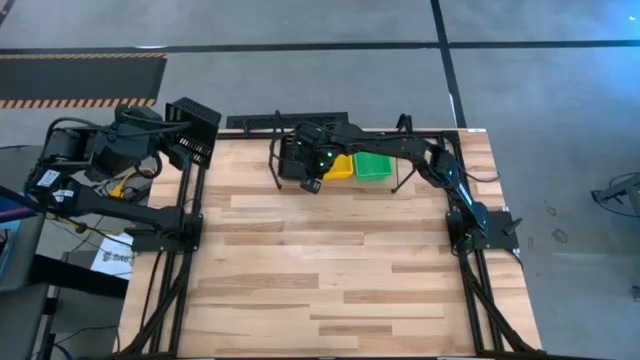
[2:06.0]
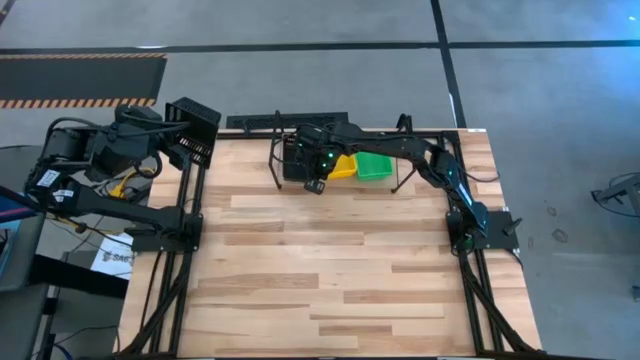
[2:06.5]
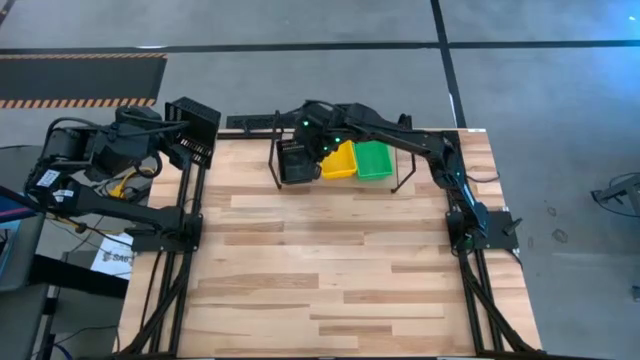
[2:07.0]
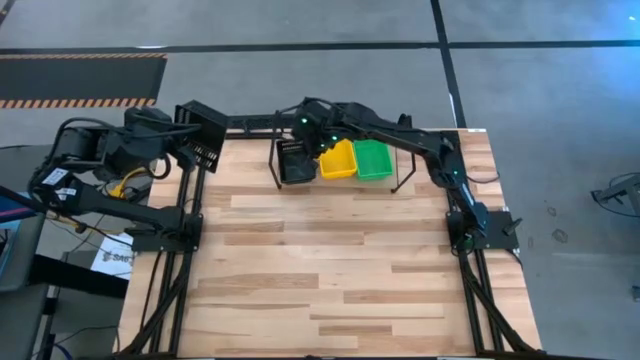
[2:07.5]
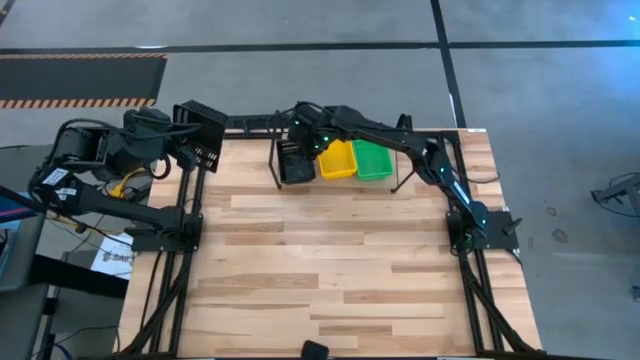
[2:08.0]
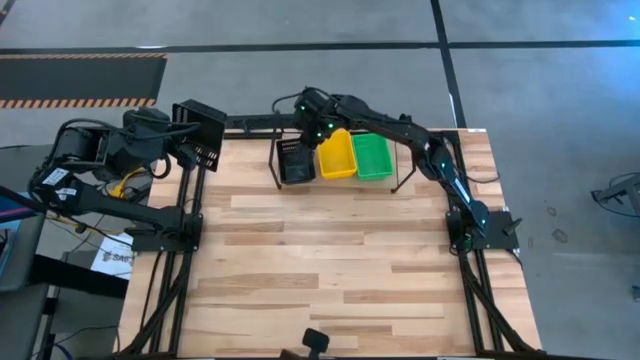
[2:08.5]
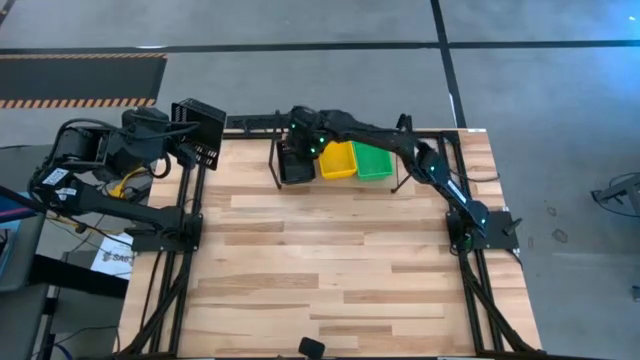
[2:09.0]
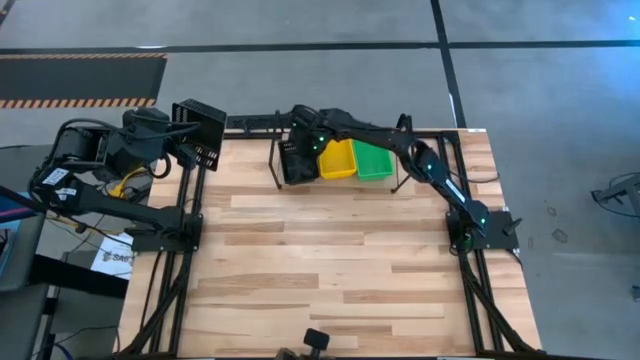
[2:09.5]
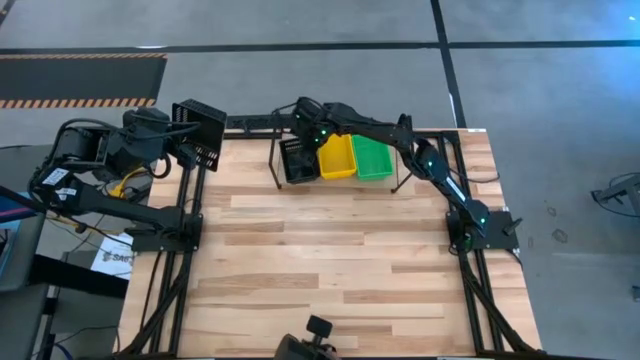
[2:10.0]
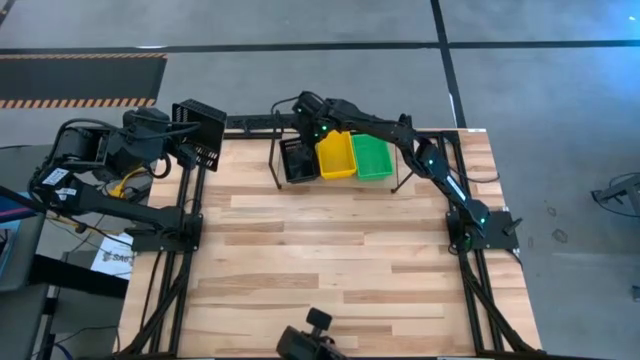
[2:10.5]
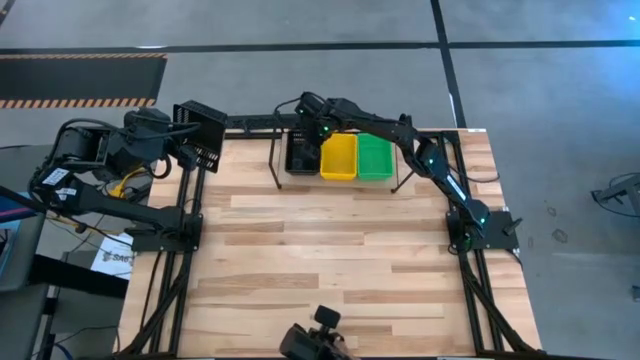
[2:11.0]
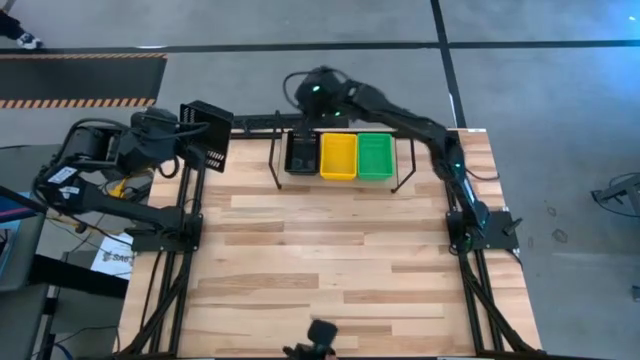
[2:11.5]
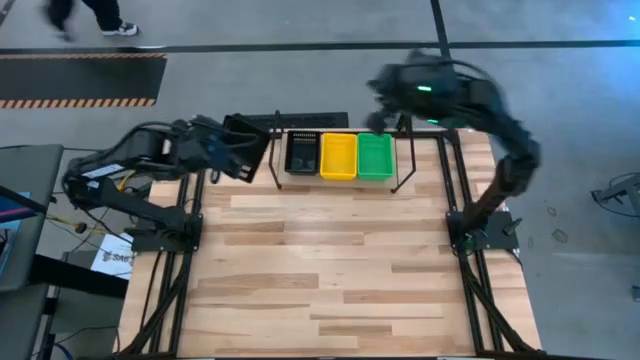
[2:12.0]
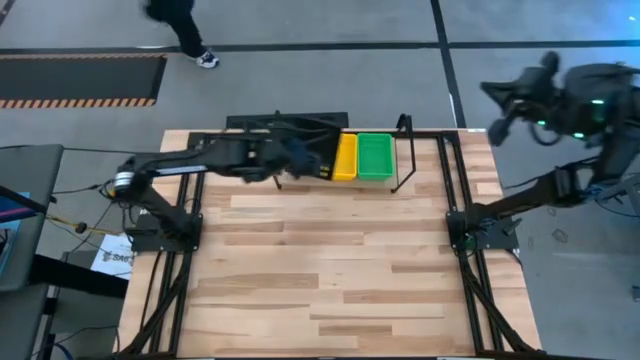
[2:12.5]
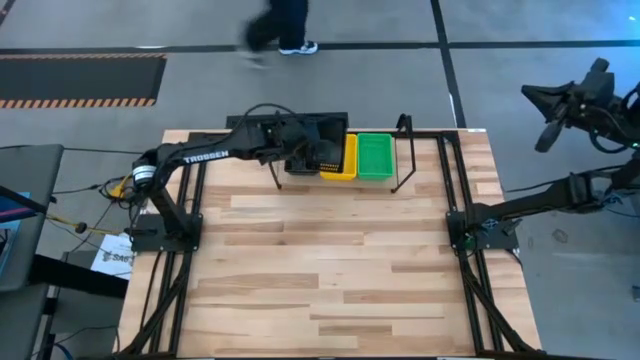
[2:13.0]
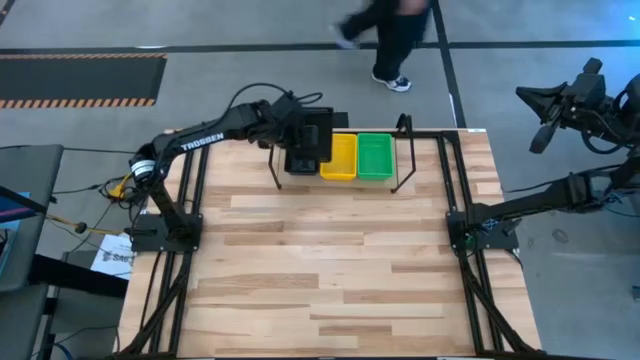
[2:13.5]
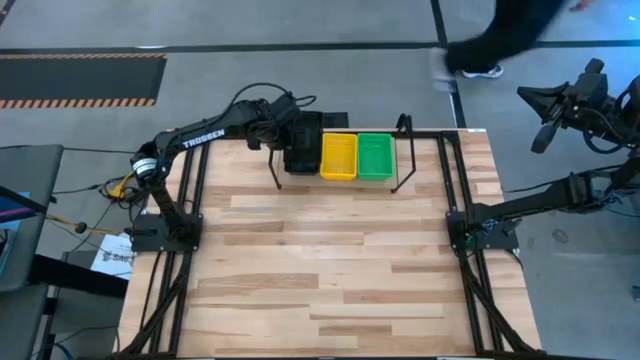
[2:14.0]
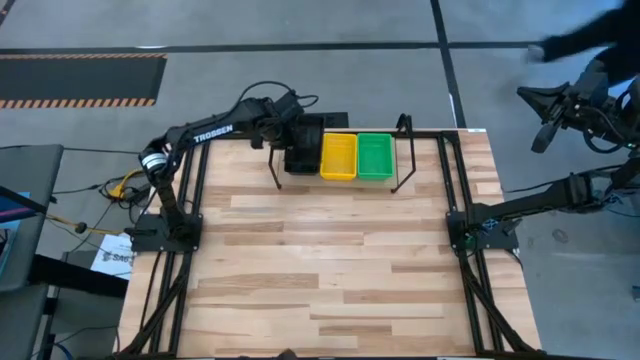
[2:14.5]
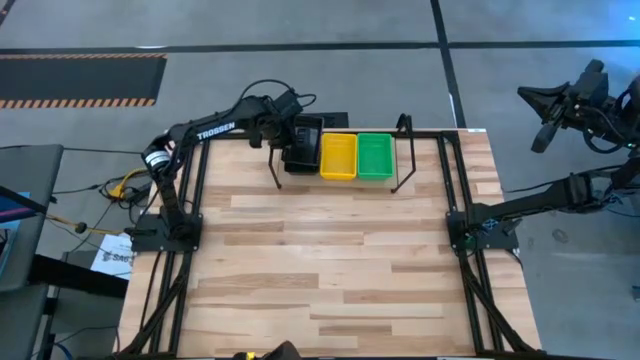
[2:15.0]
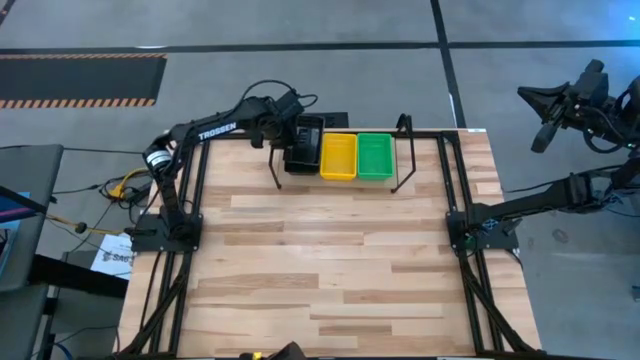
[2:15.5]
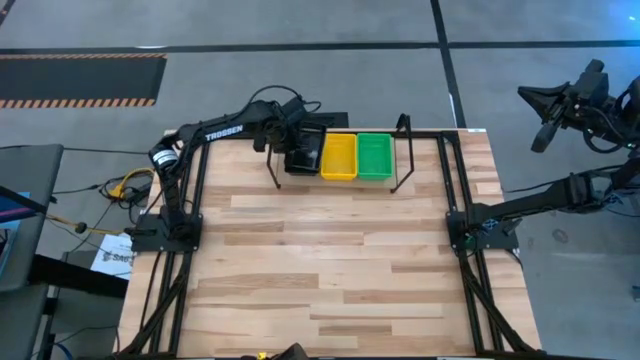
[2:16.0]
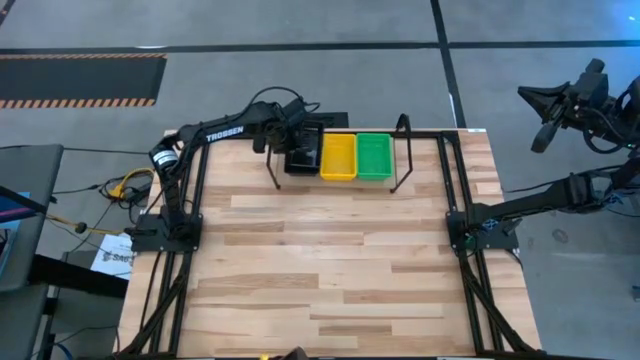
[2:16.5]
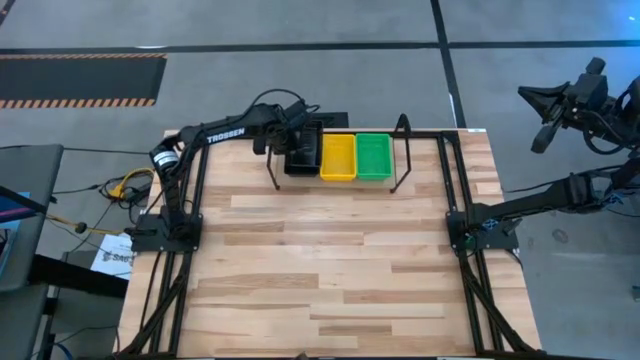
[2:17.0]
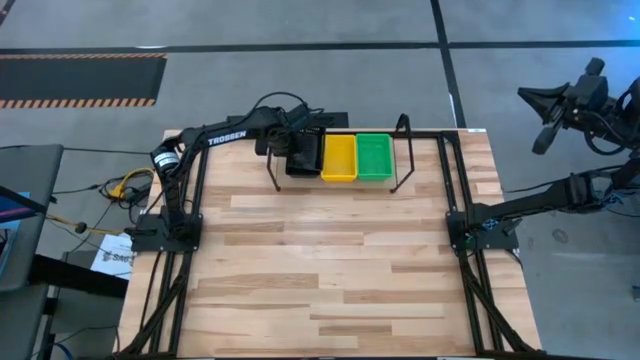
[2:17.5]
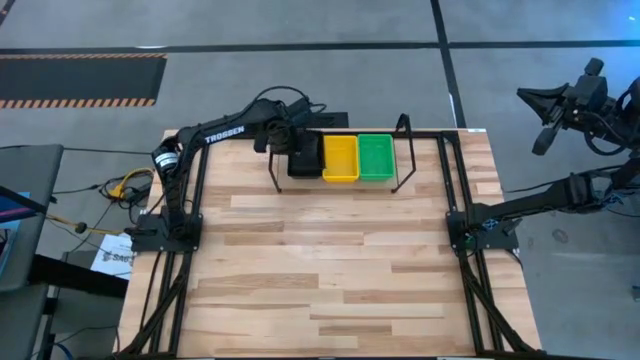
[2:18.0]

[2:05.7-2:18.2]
Task: Stack baskets on shelf by color
Stack the black bin on top of the black bins on the shelf

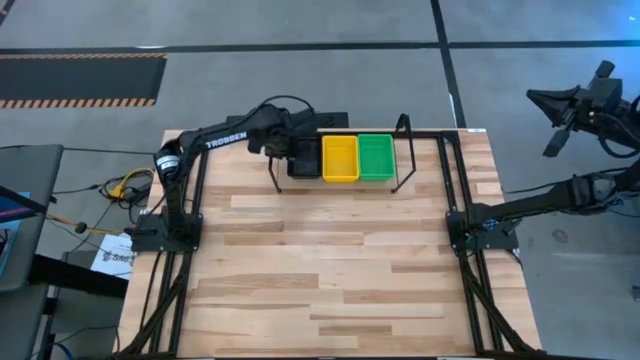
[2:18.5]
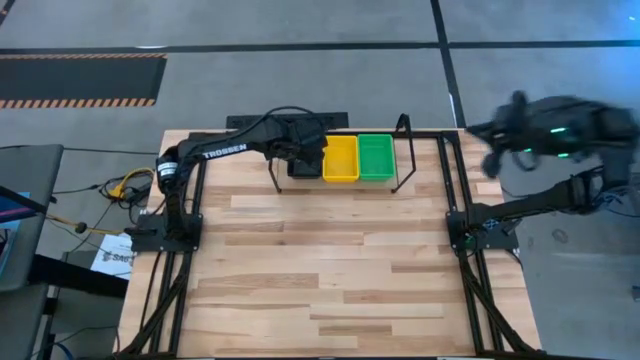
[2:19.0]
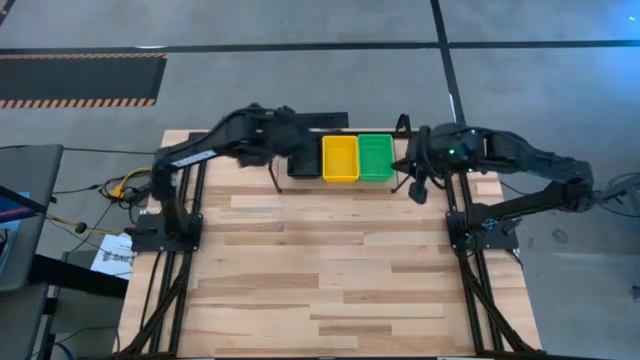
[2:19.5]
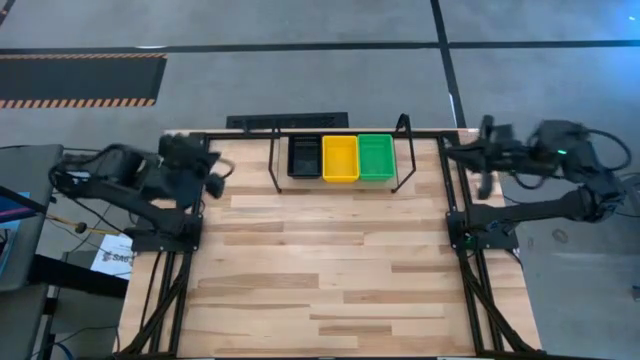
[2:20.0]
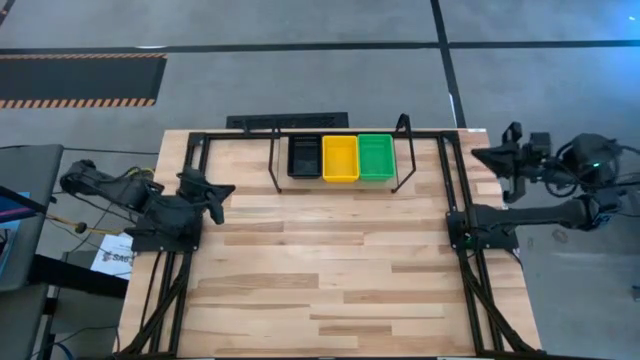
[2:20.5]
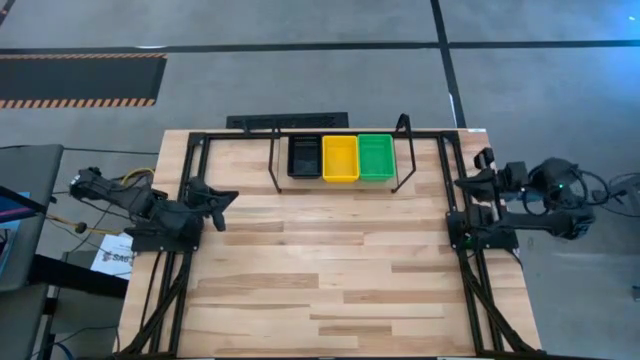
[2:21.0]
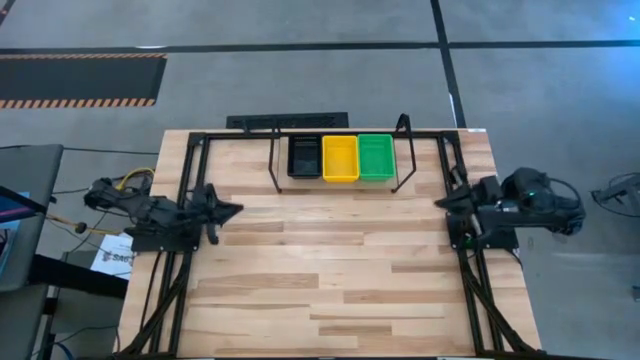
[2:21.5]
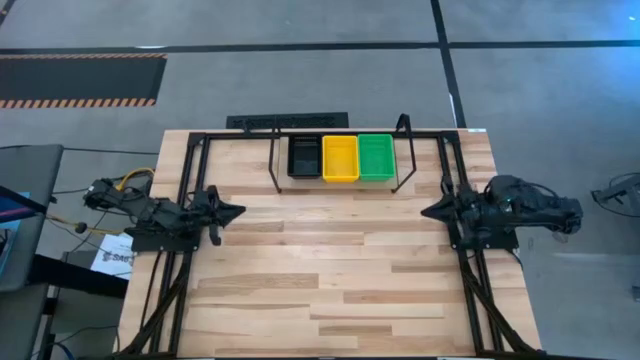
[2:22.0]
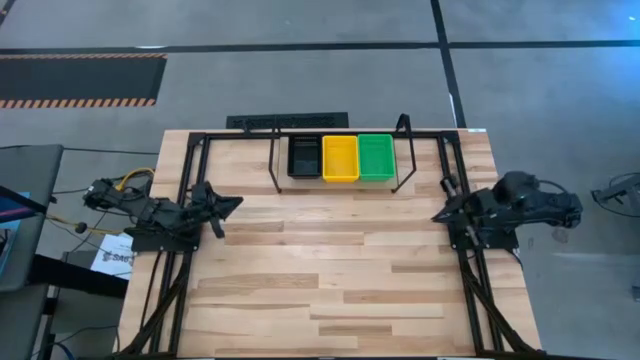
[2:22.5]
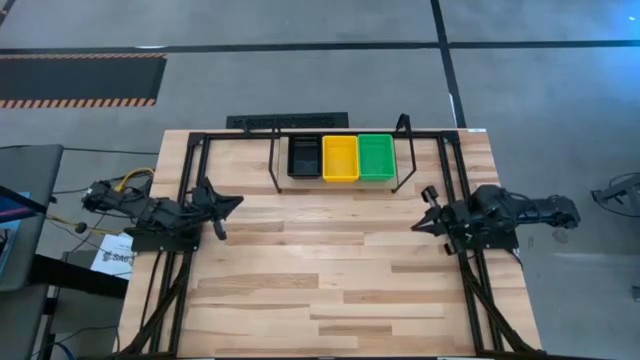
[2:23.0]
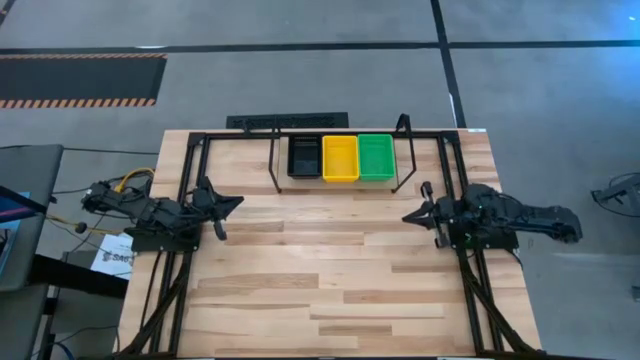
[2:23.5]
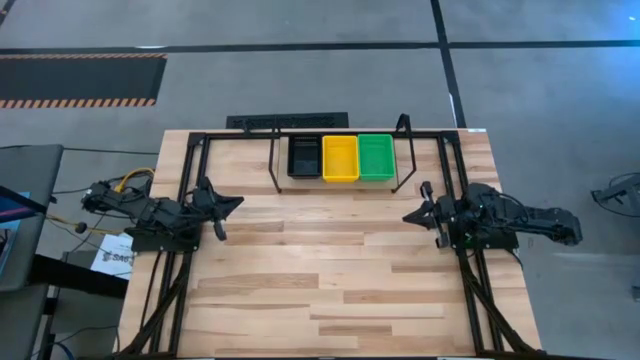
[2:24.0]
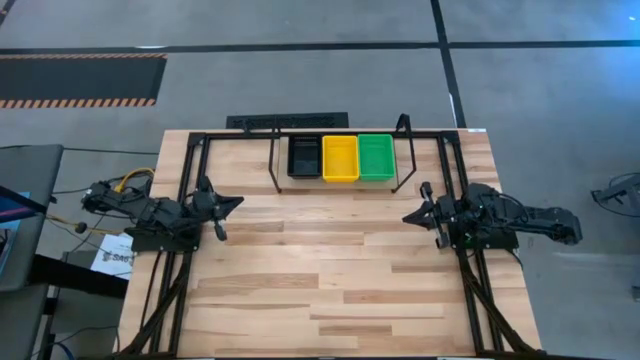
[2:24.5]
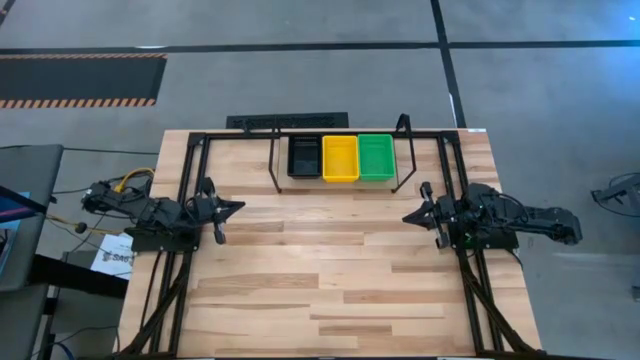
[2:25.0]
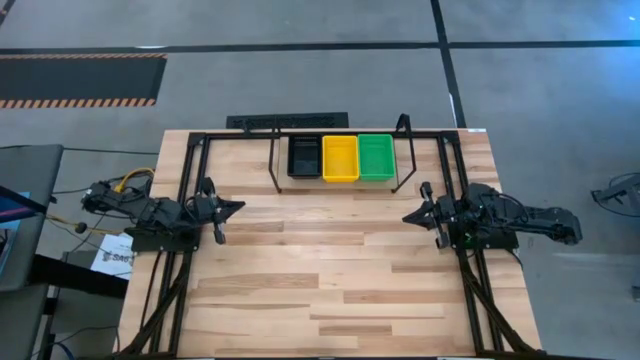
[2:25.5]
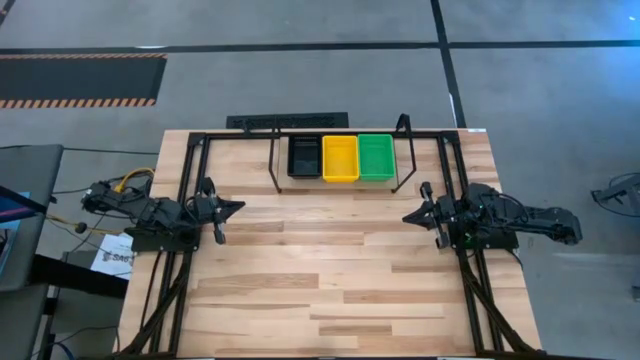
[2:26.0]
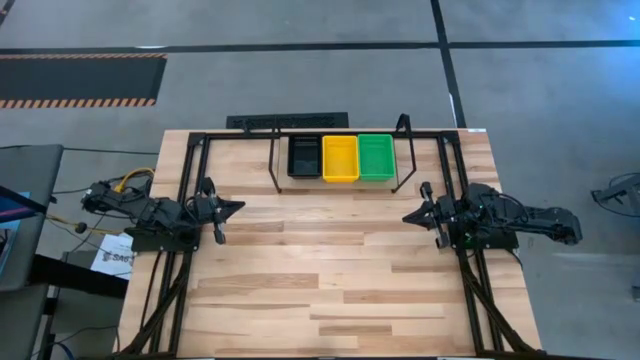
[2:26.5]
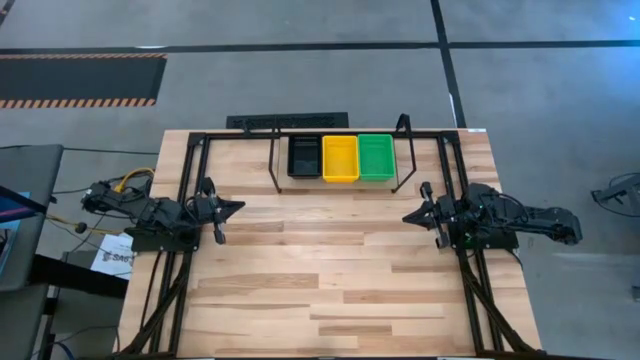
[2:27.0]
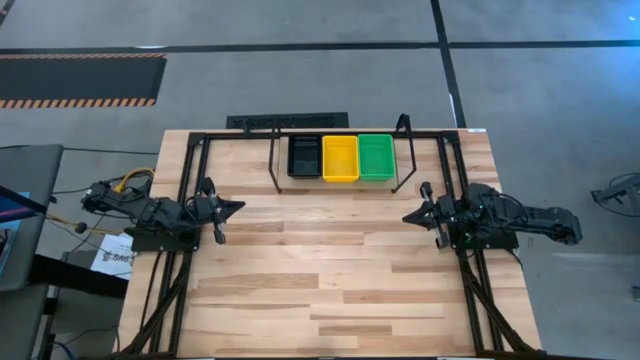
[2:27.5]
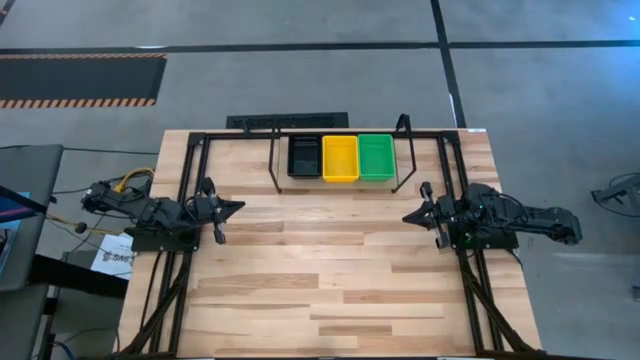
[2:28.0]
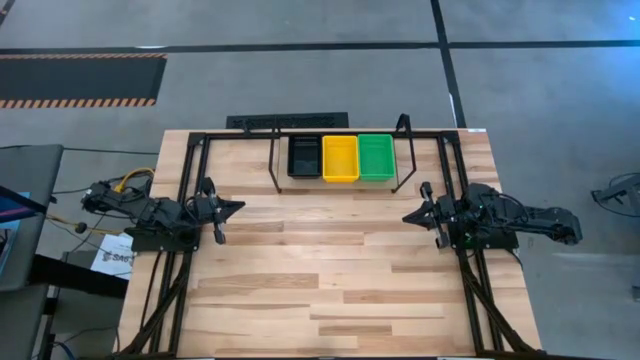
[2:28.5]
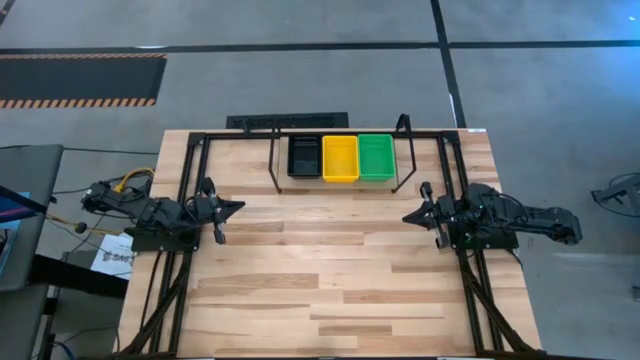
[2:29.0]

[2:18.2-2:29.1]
Return to Home Position
